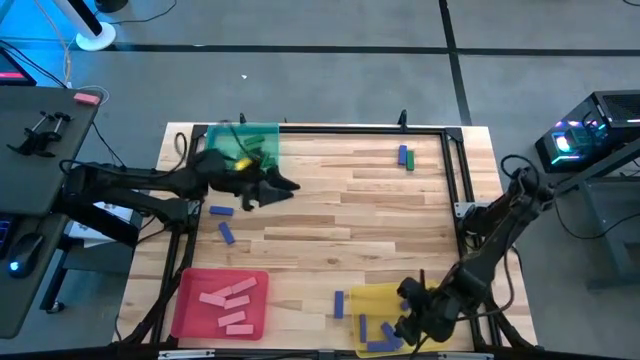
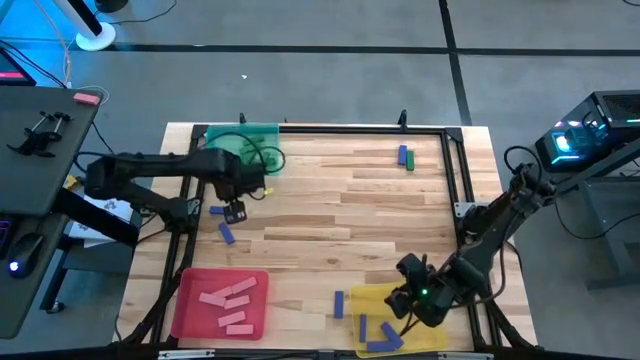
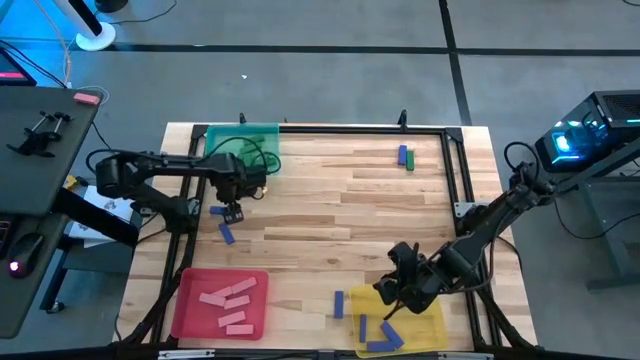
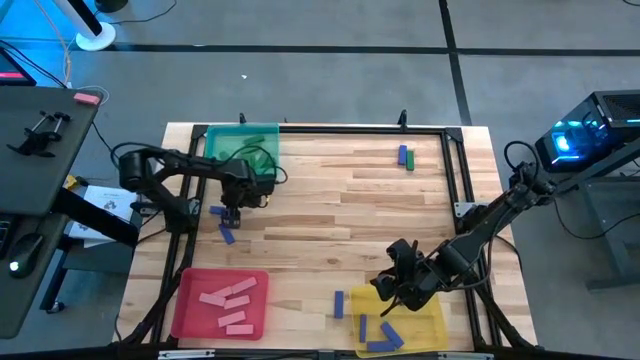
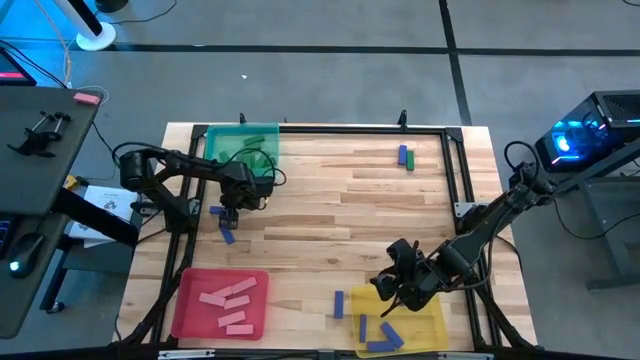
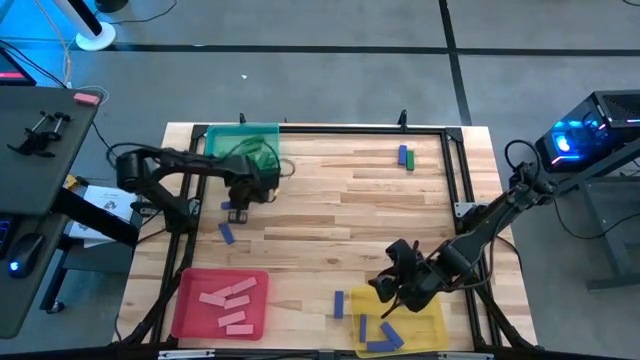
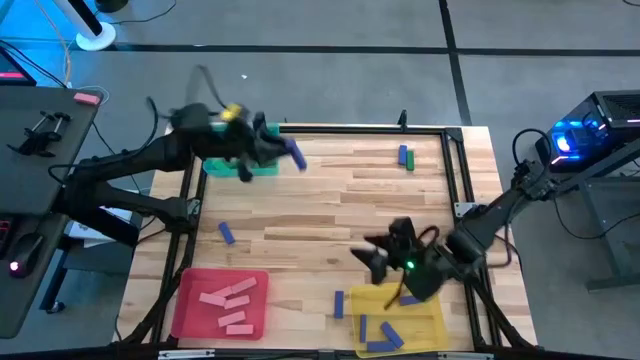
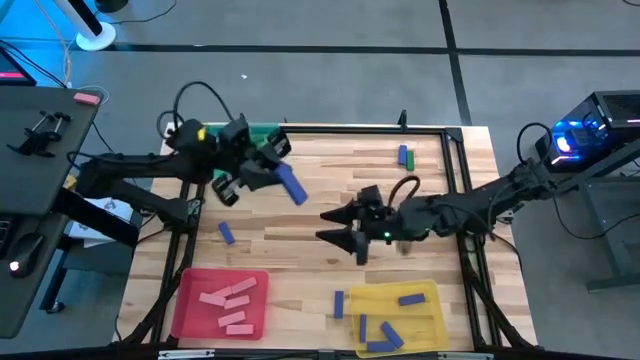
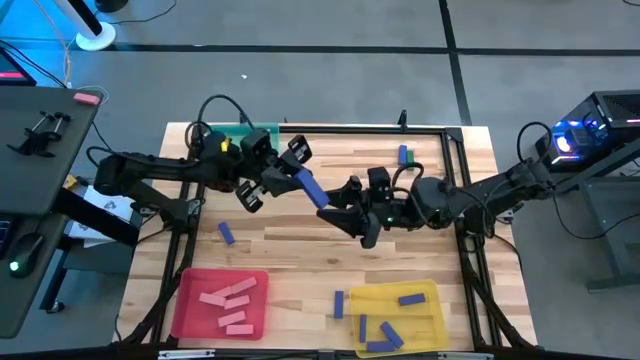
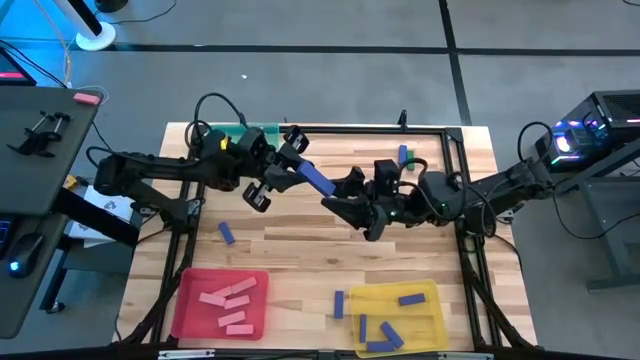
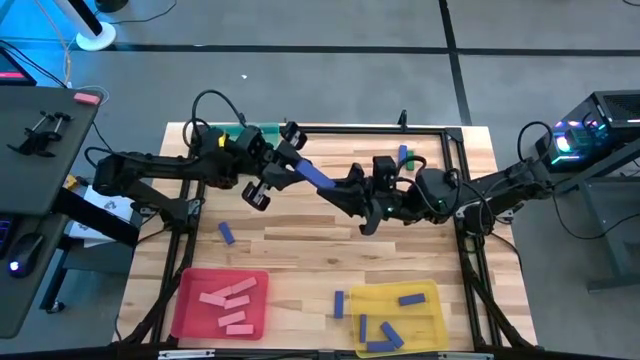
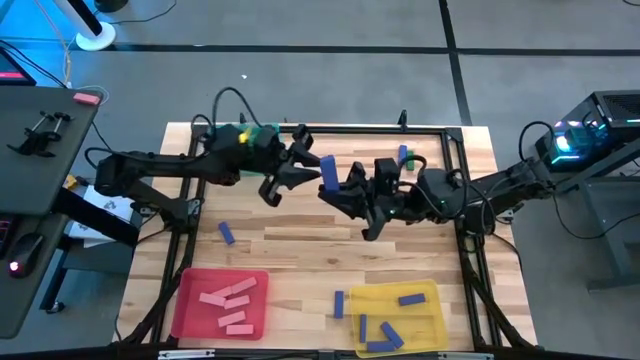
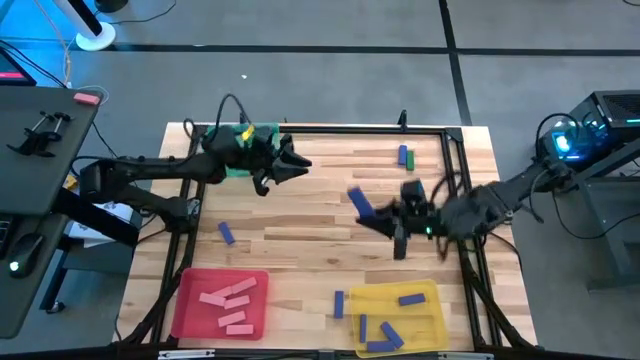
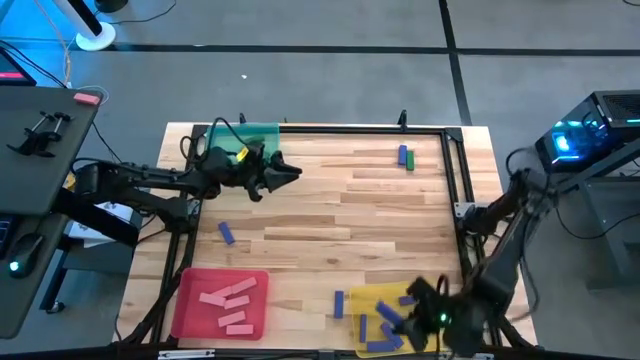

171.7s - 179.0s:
Task: Sort blocks
Put the blue block into the yellow bin

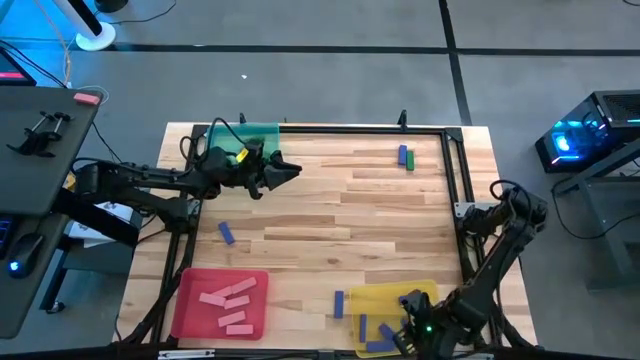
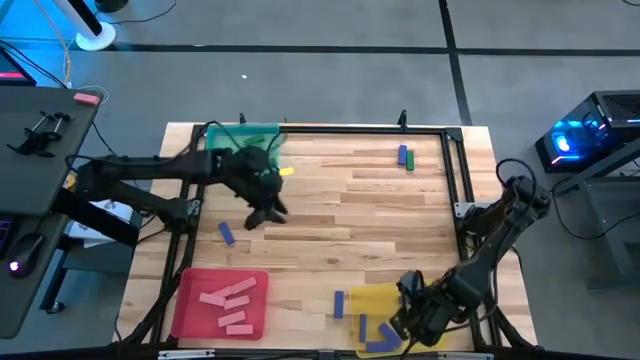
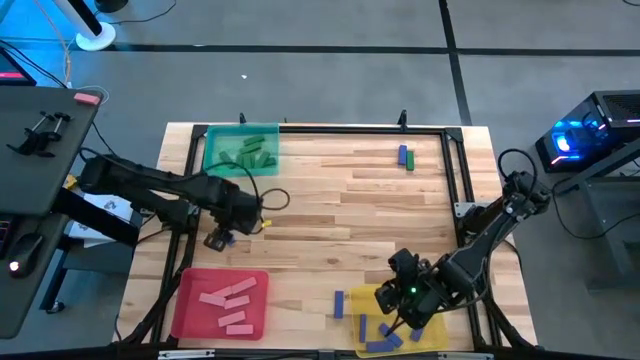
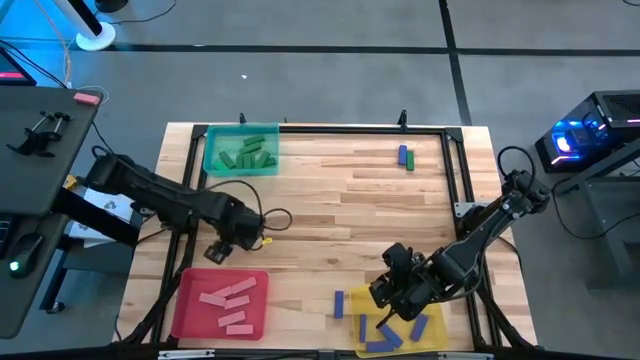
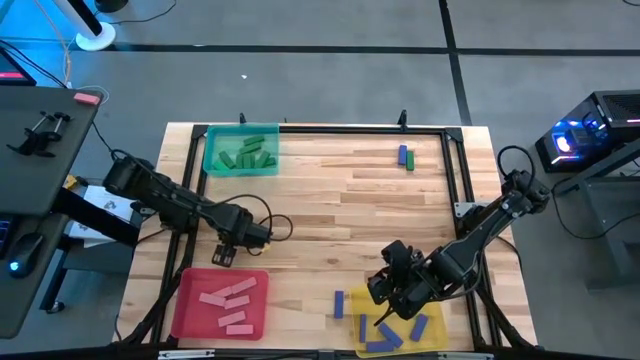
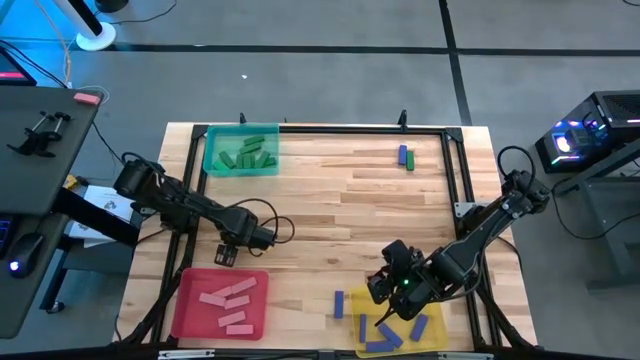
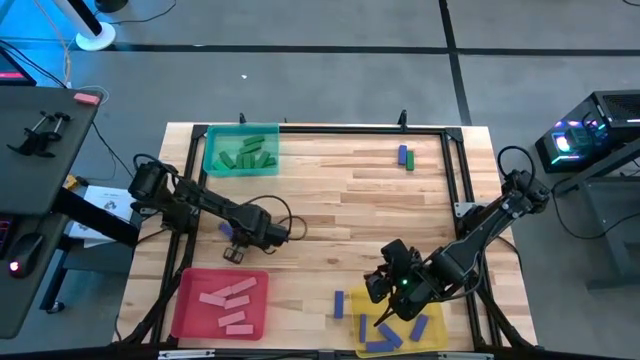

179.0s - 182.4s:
Put the blue block into the yellow bin

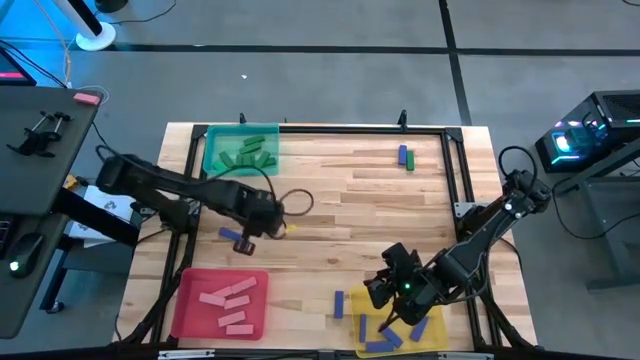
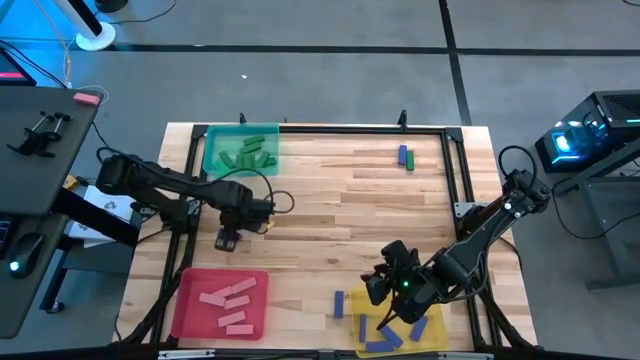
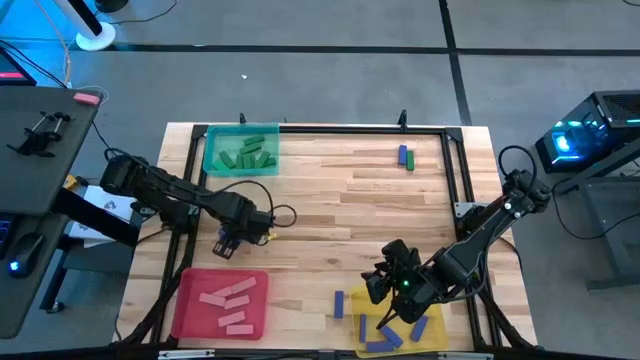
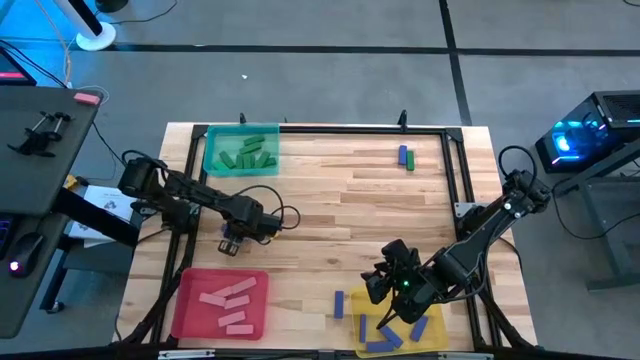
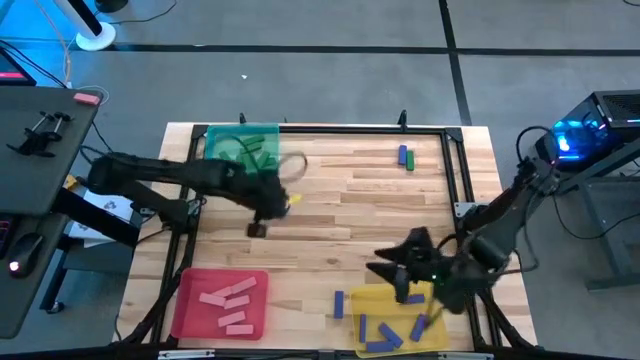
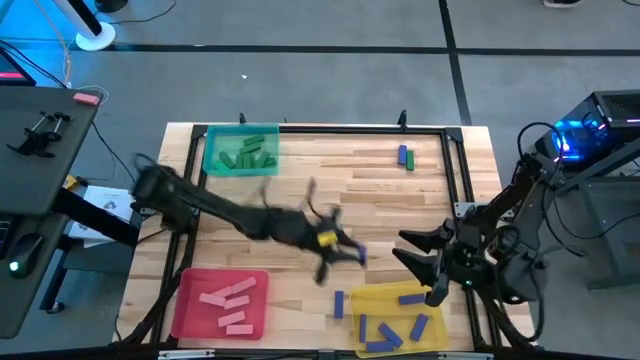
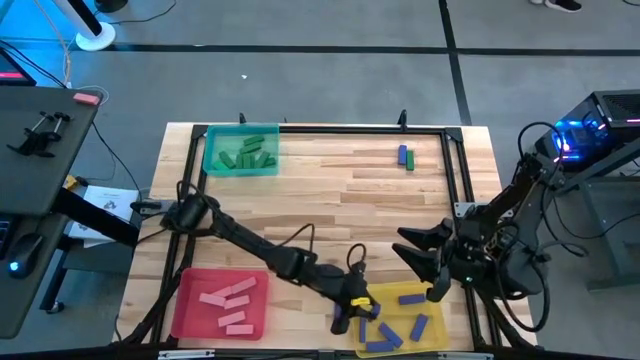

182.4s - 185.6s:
Put the blue block into the yellow bin

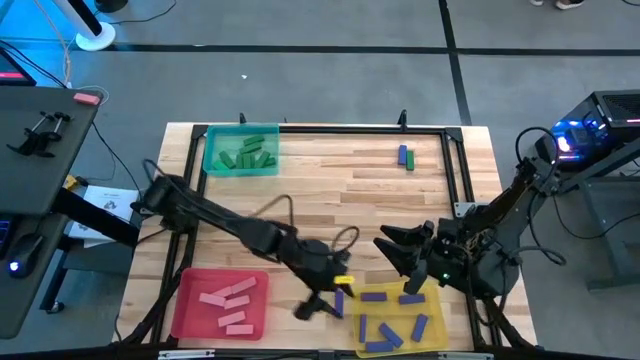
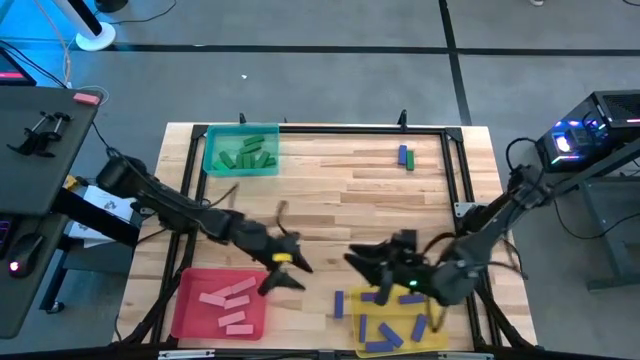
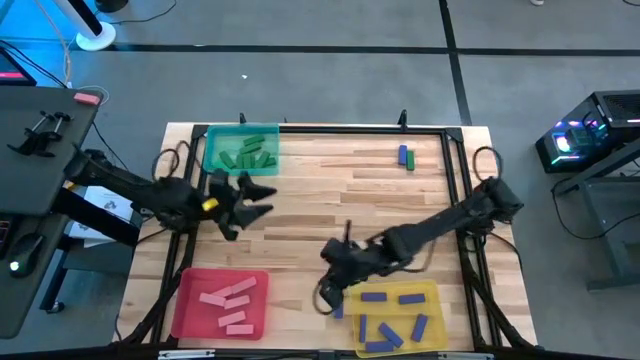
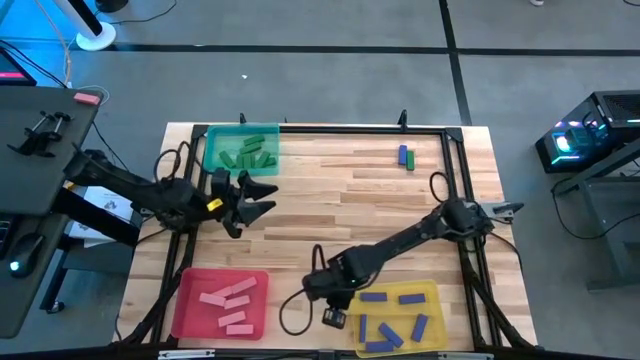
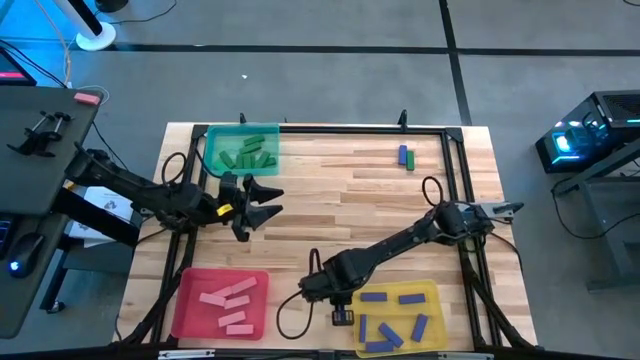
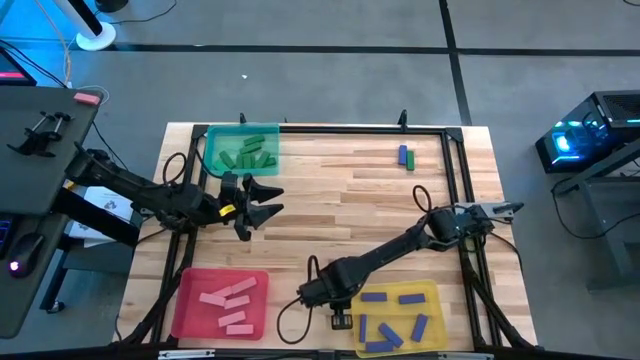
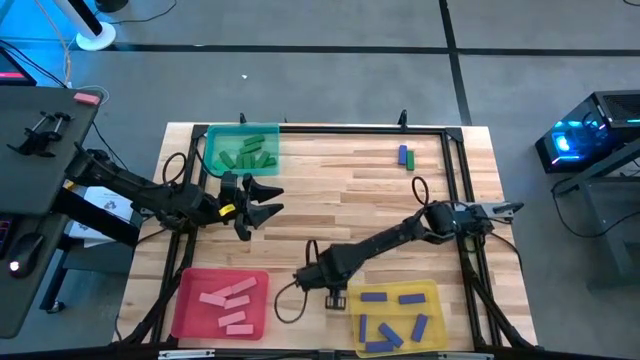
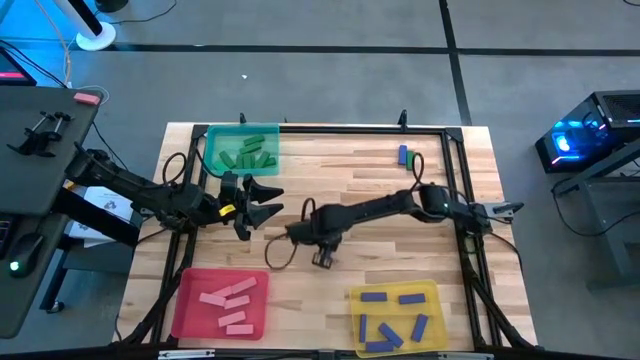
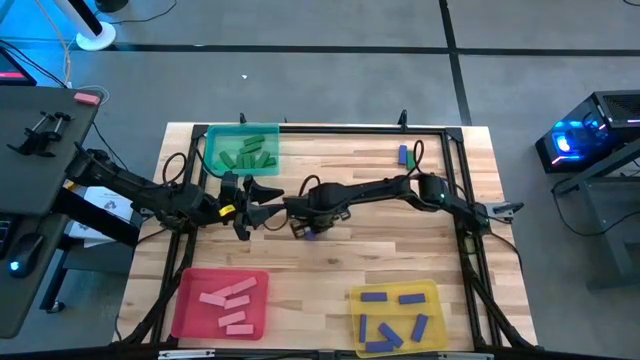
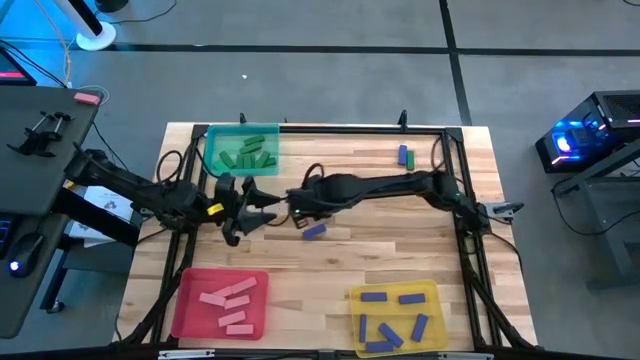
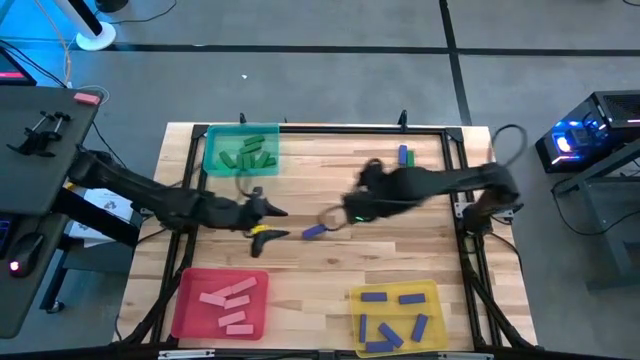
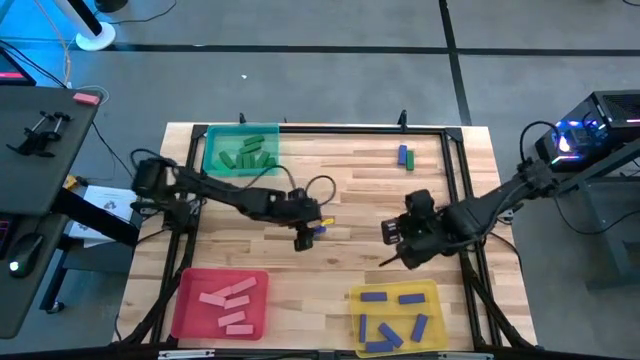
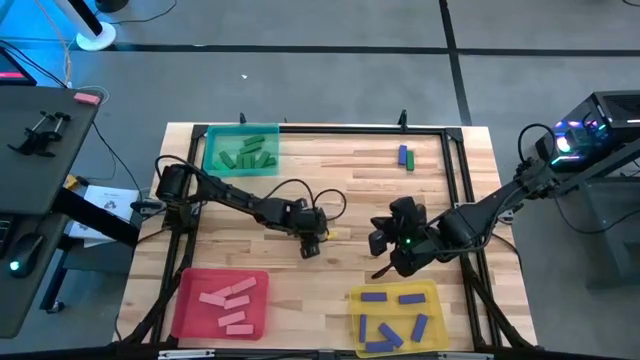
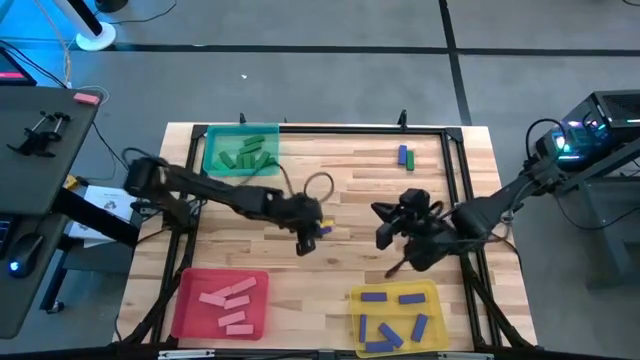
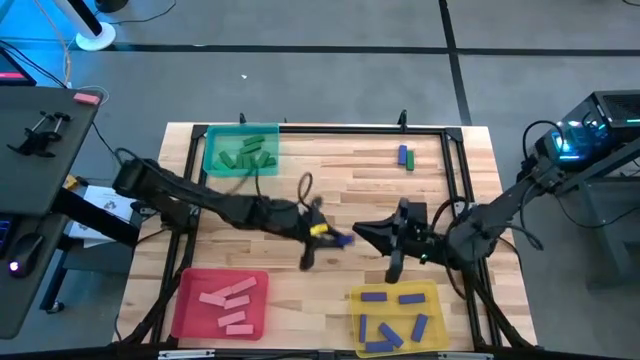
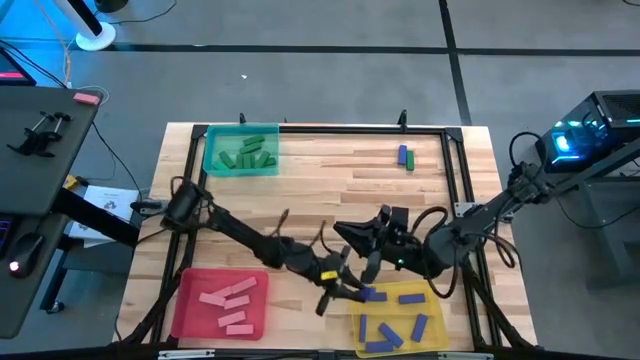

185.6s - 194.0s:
Put the blue block into the yellow bin
